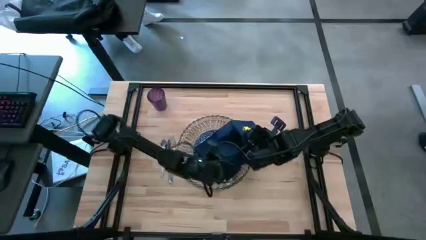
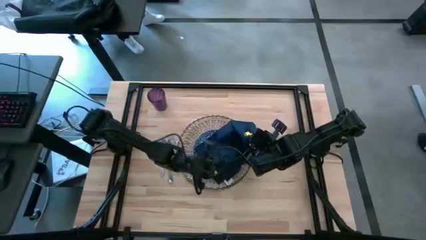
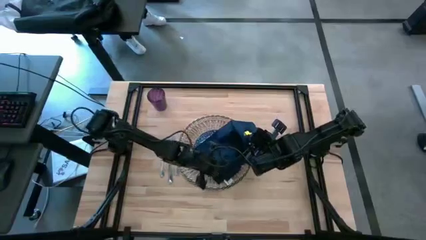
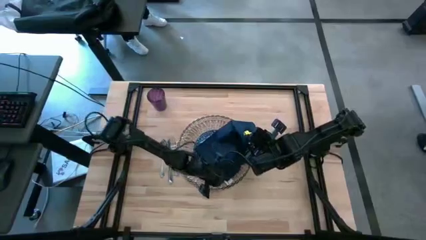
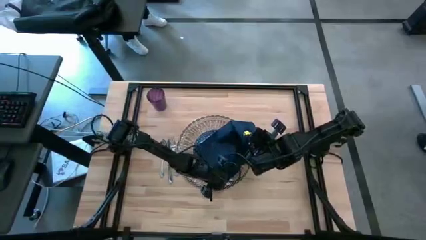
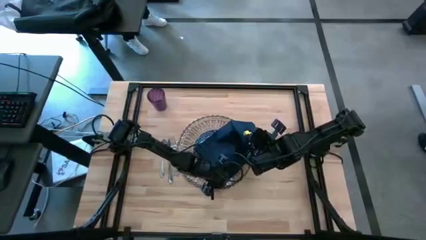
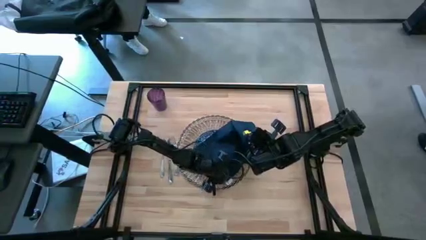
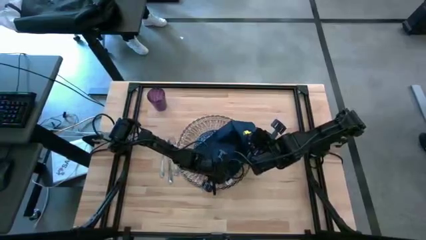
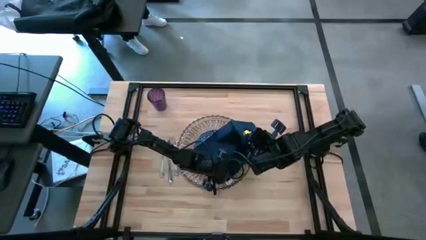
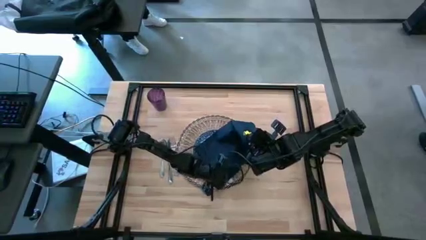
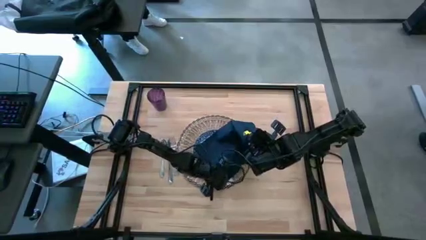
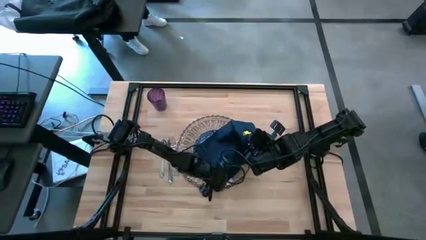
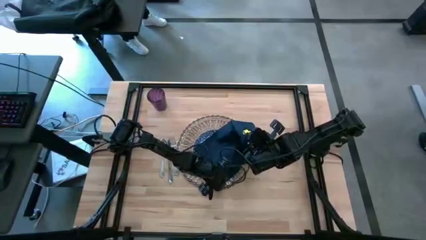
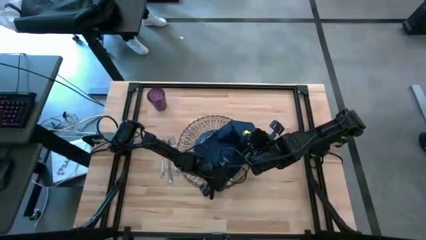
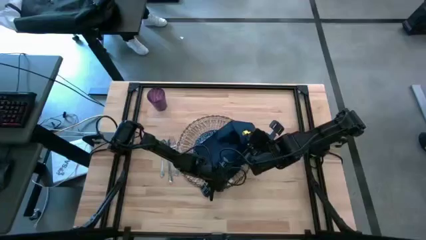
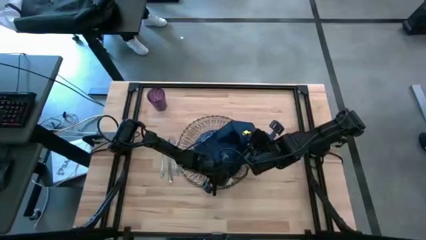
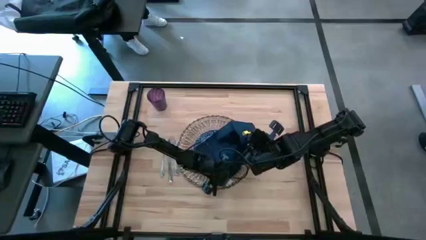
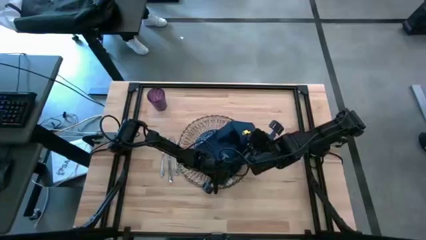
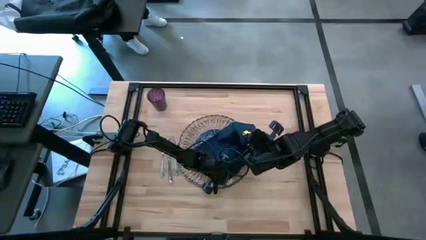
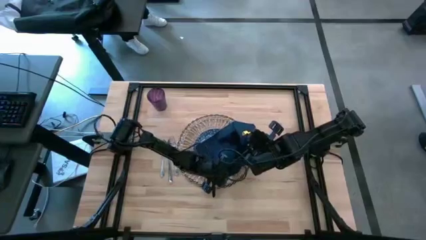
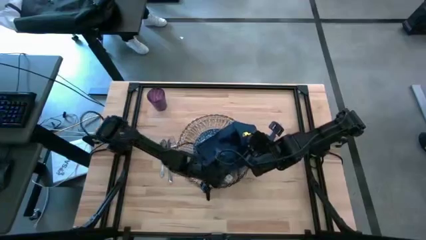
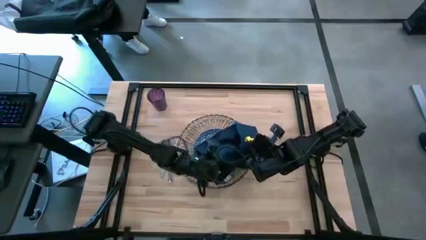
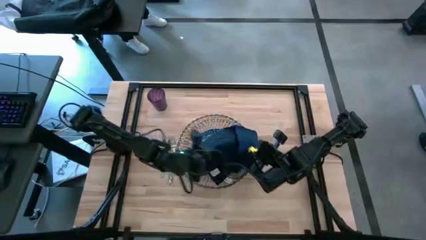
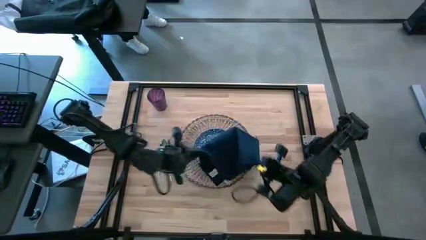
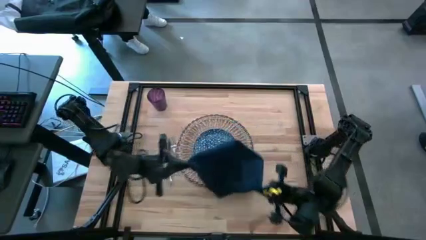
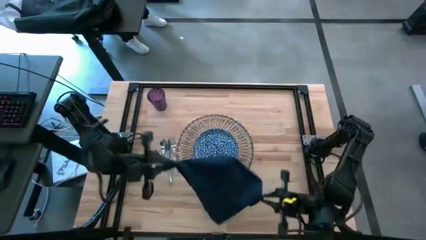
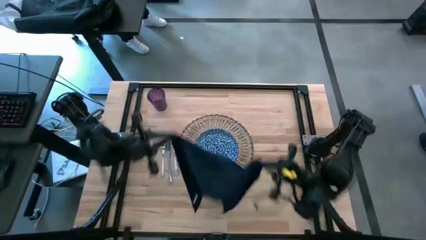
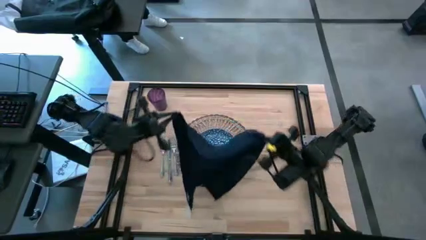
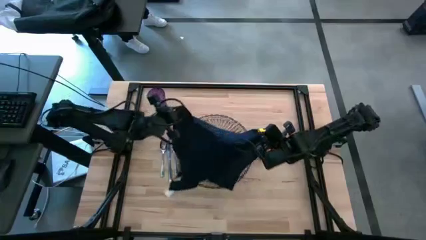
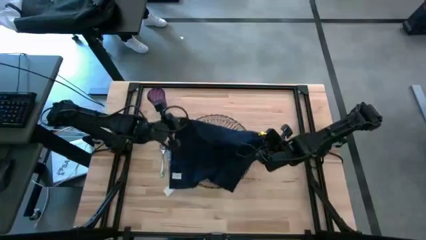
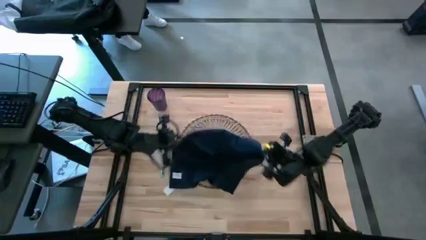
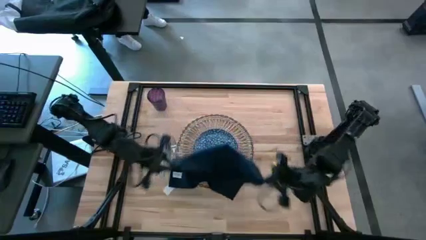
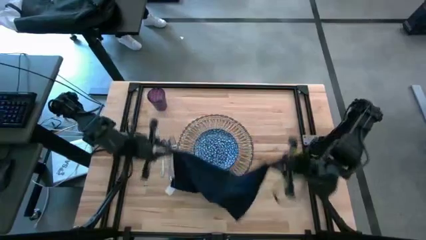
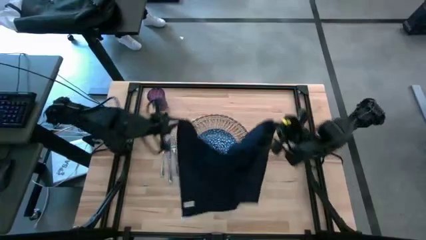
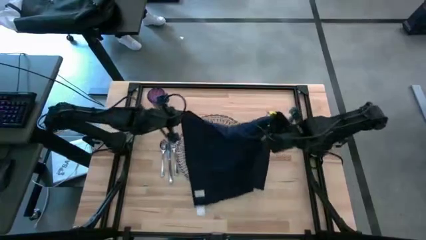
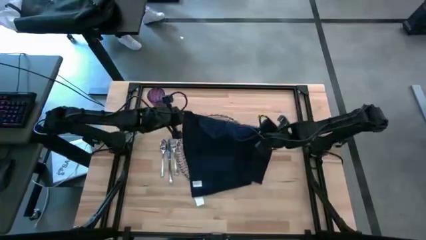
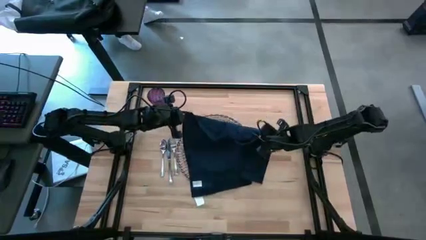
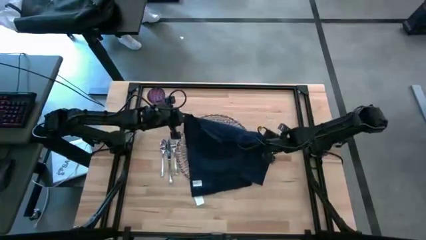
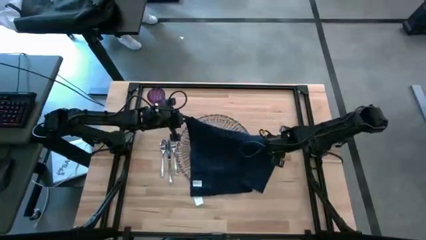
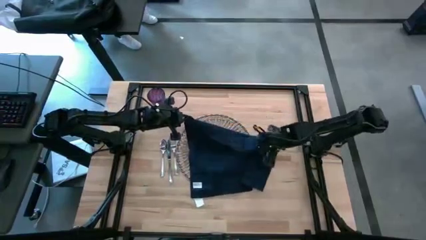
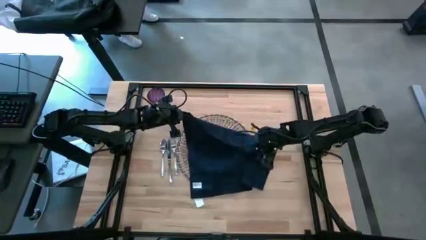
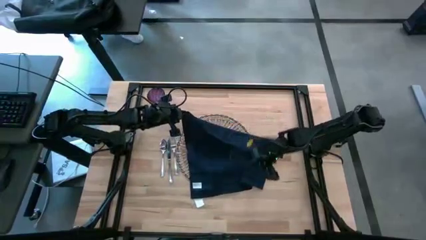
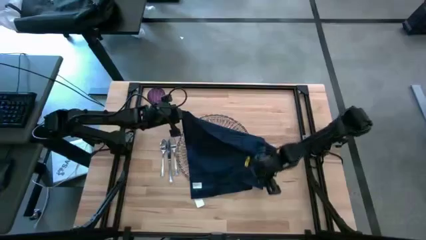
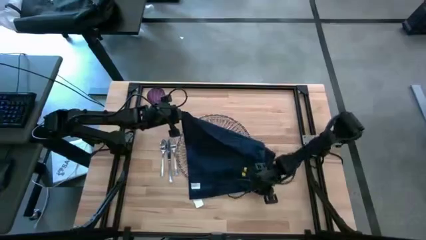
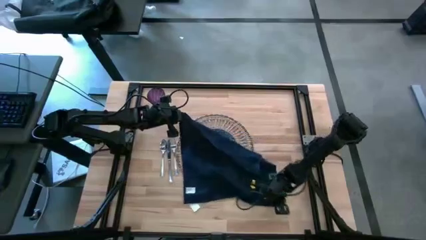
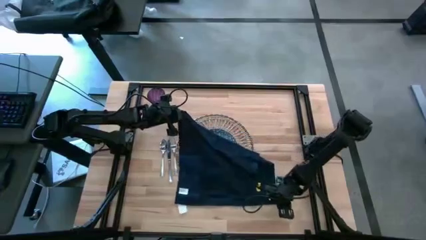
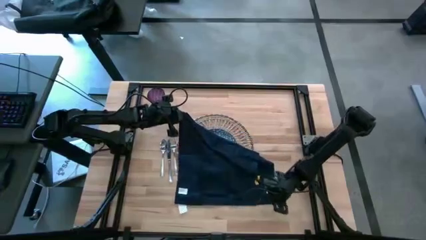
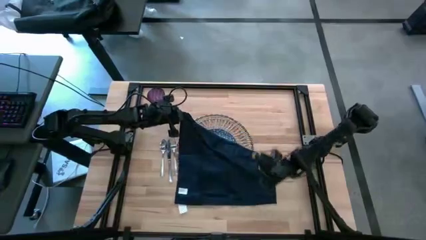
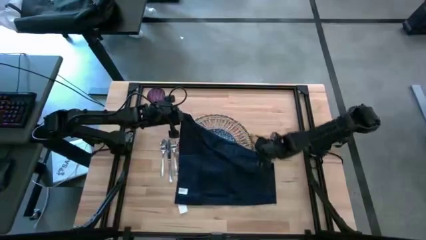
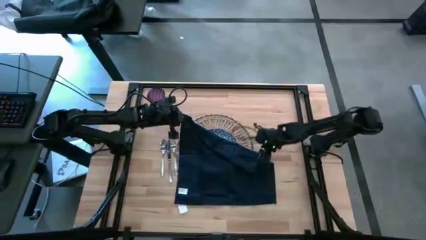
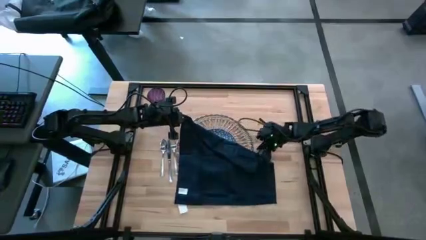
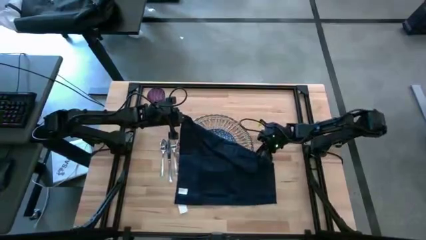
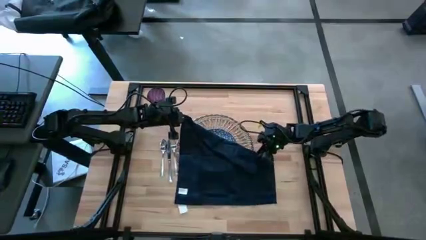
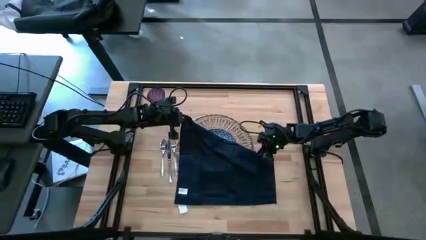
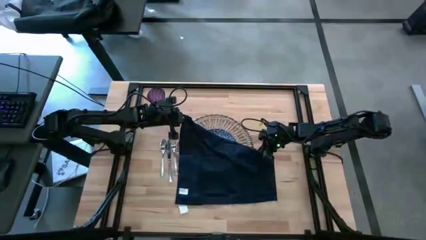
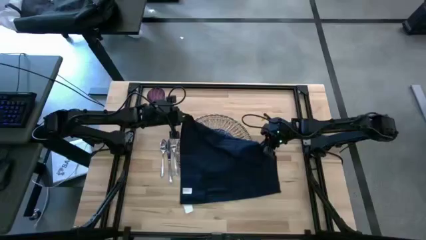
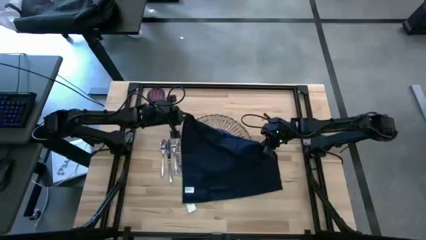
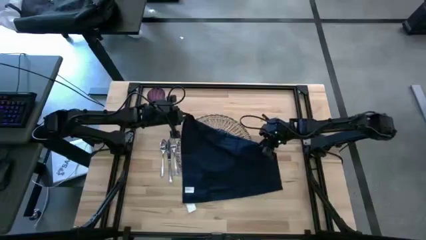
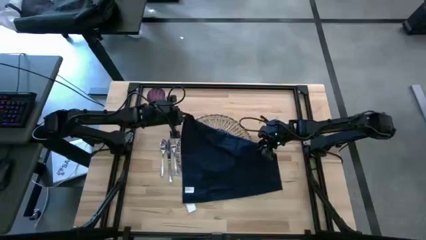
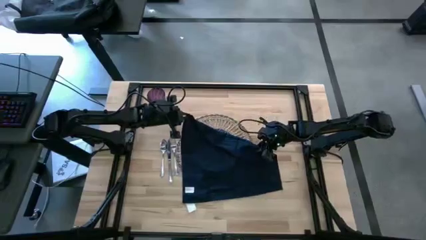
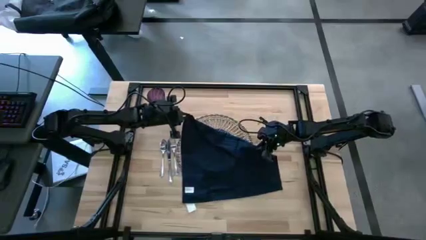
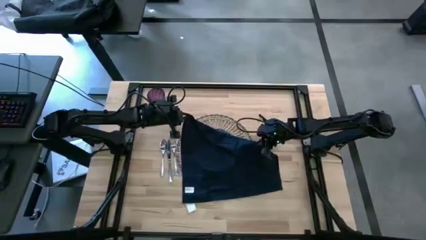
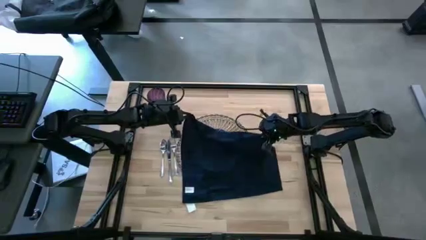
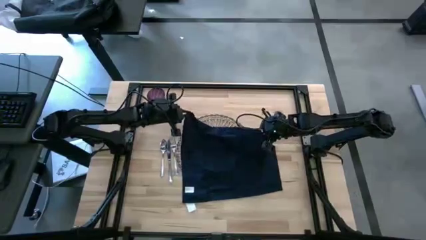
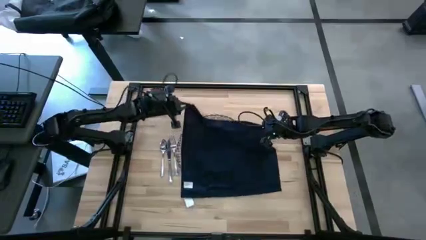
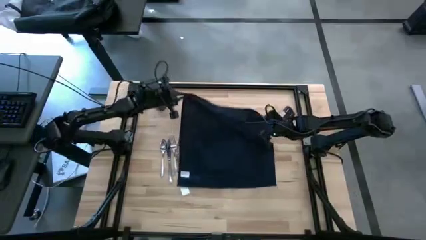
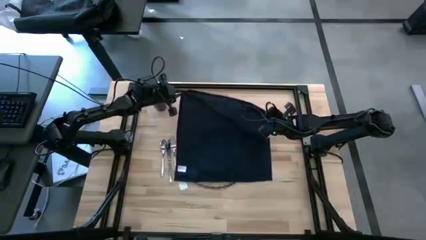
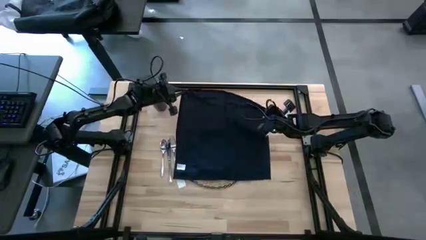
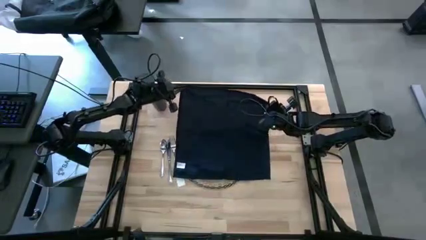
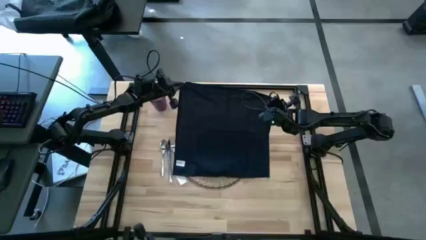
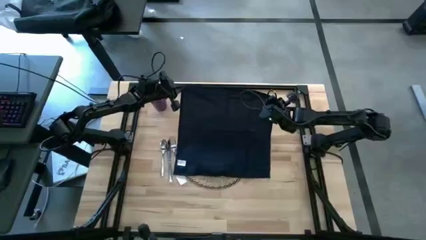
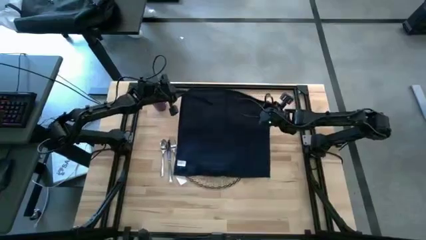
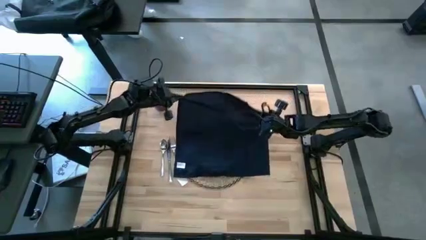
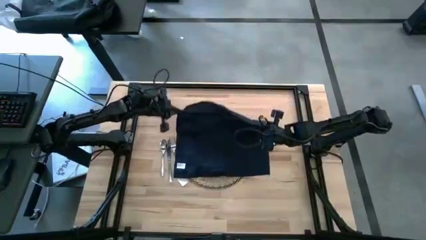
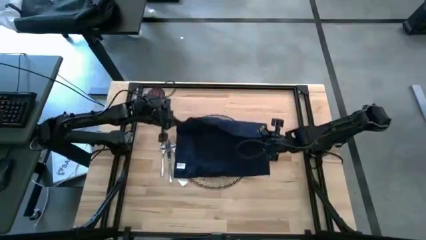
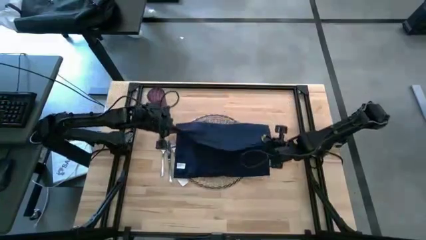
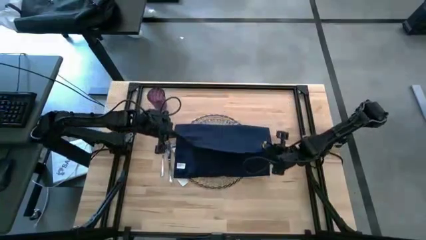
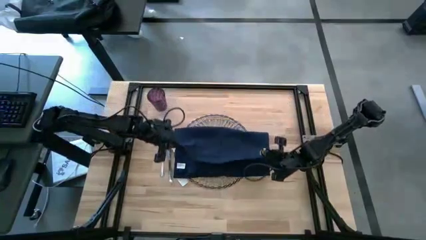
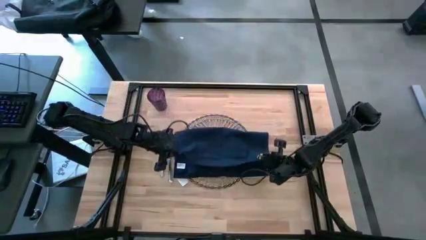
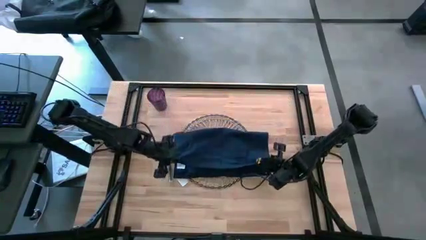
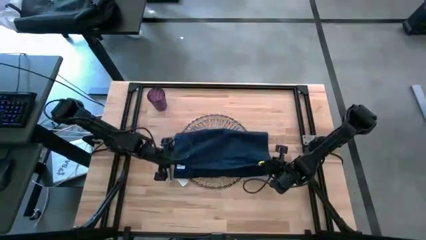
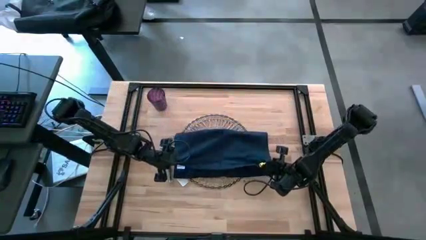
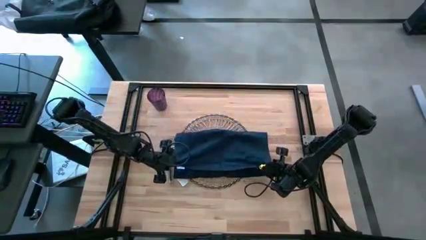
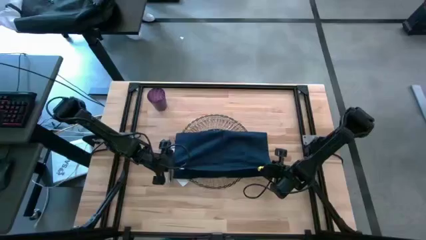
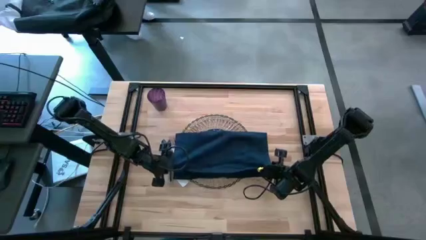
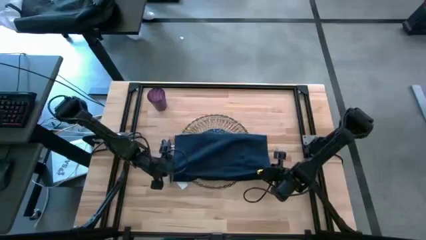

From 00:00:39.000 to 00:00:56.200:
Task: Set table place
Fold the blue napkin
